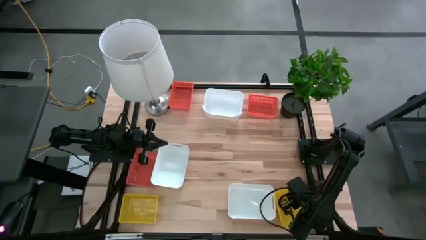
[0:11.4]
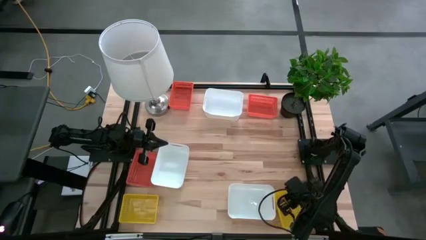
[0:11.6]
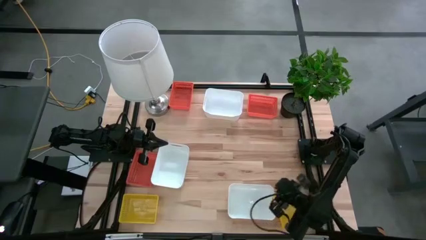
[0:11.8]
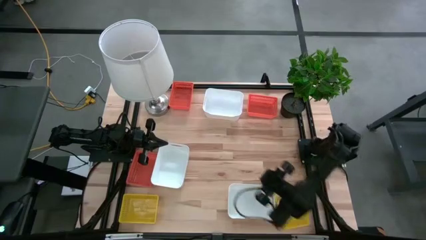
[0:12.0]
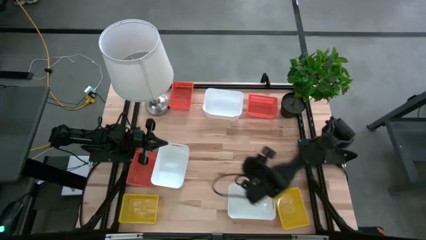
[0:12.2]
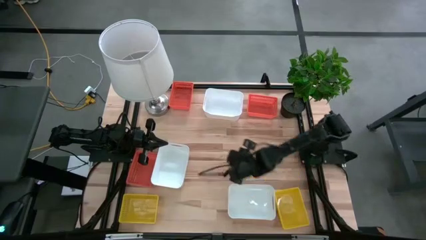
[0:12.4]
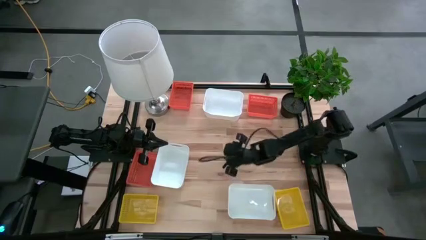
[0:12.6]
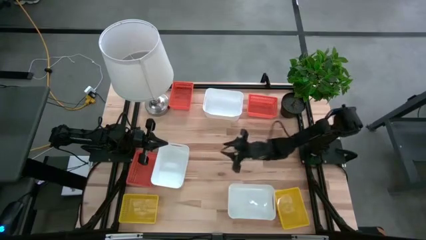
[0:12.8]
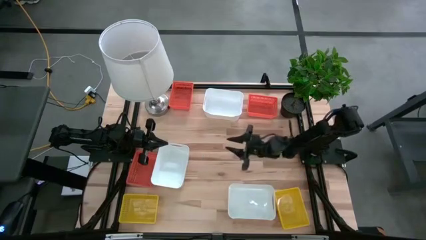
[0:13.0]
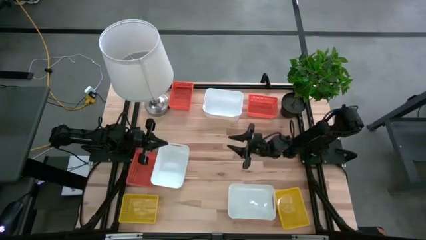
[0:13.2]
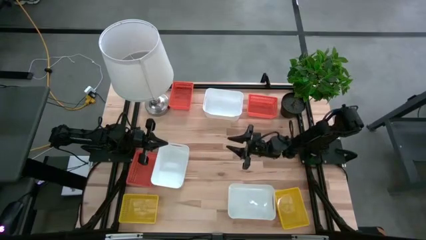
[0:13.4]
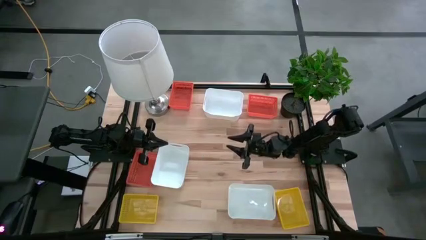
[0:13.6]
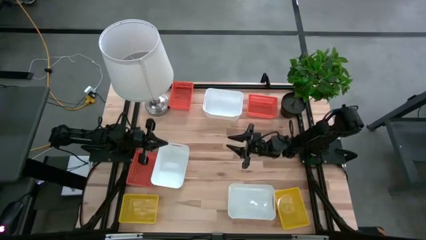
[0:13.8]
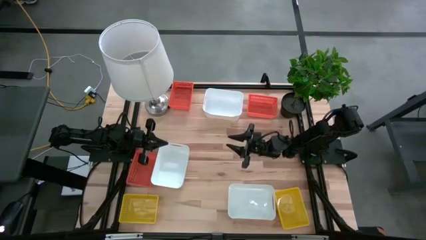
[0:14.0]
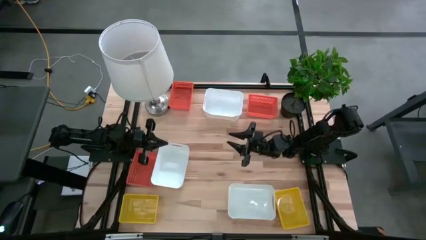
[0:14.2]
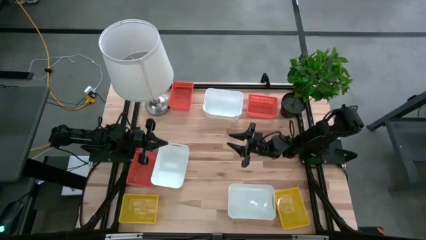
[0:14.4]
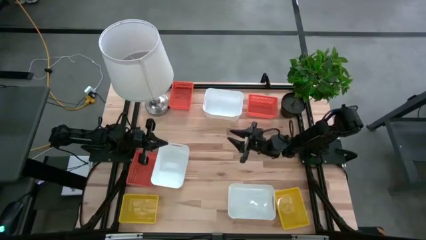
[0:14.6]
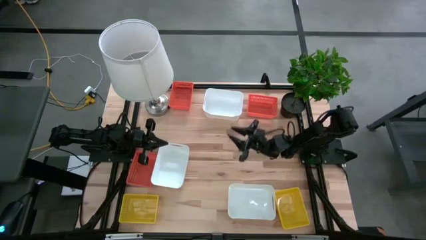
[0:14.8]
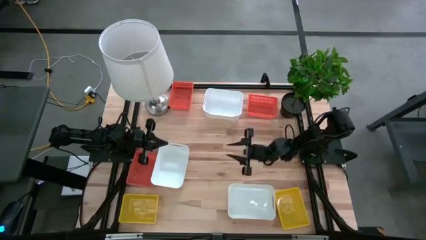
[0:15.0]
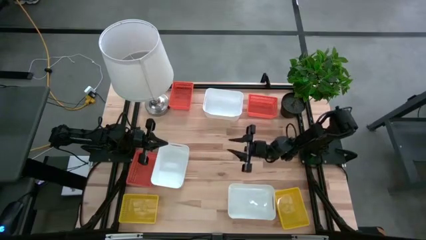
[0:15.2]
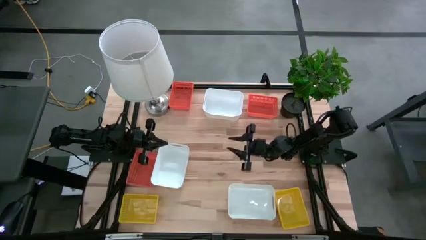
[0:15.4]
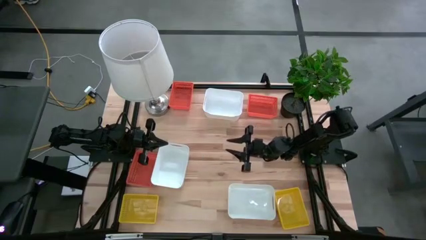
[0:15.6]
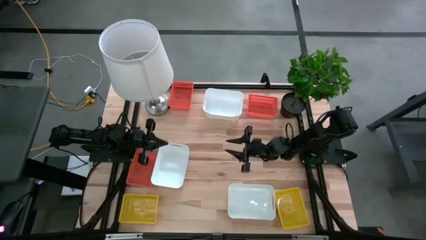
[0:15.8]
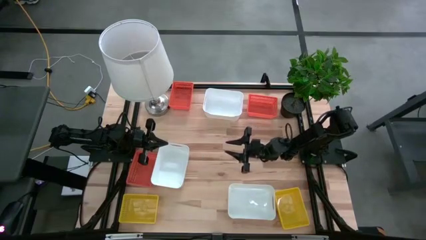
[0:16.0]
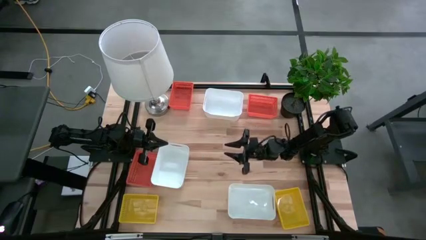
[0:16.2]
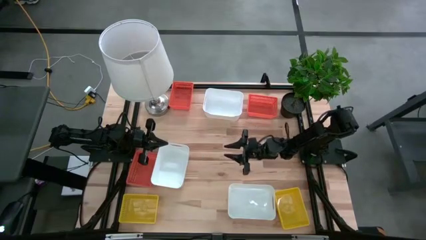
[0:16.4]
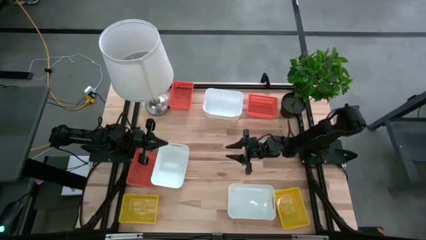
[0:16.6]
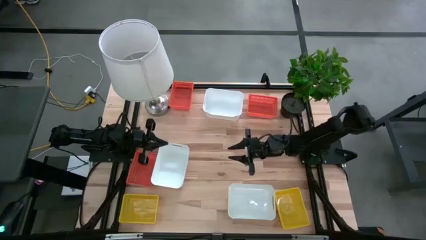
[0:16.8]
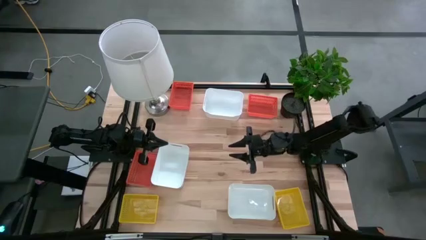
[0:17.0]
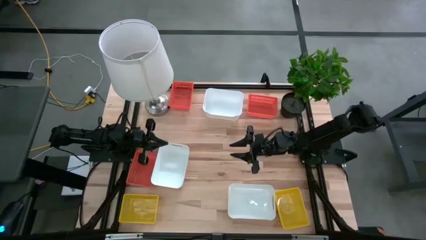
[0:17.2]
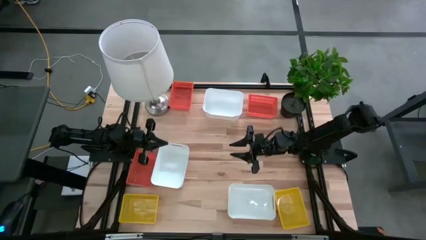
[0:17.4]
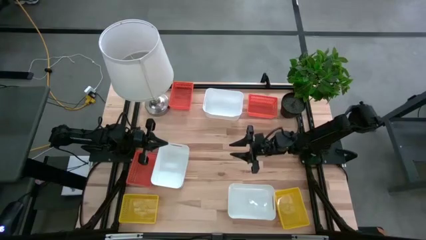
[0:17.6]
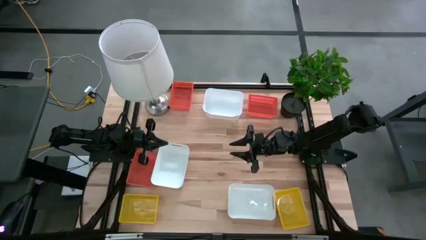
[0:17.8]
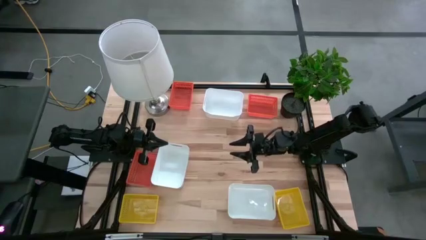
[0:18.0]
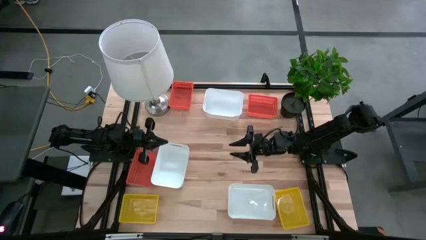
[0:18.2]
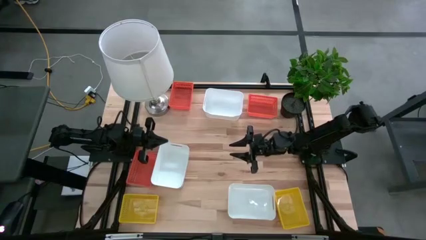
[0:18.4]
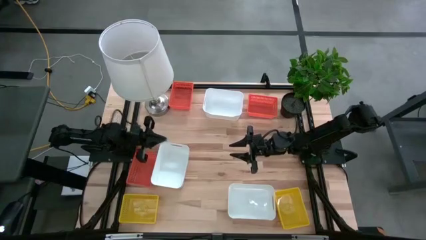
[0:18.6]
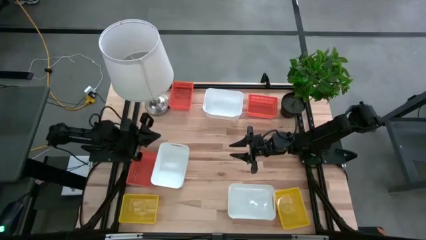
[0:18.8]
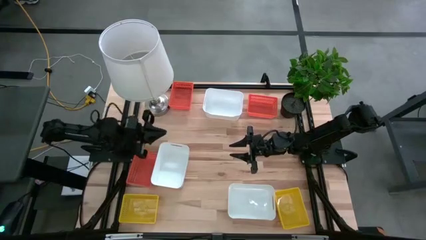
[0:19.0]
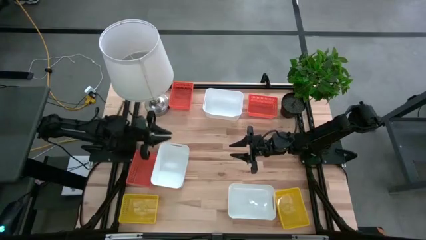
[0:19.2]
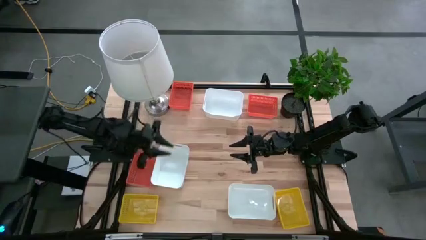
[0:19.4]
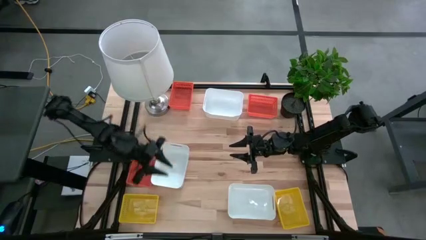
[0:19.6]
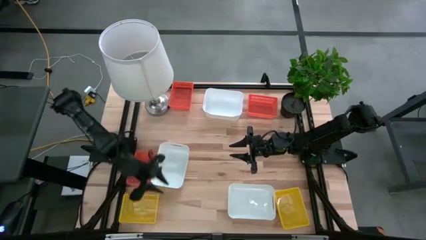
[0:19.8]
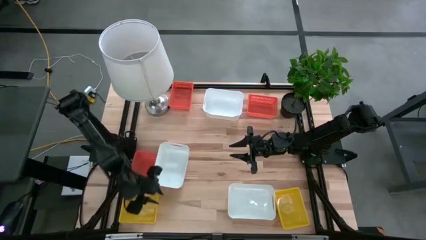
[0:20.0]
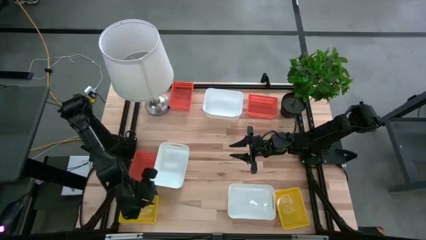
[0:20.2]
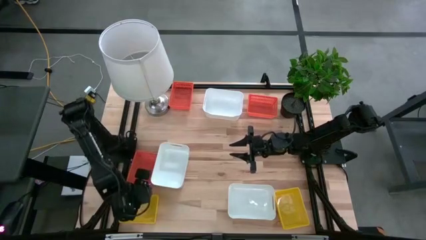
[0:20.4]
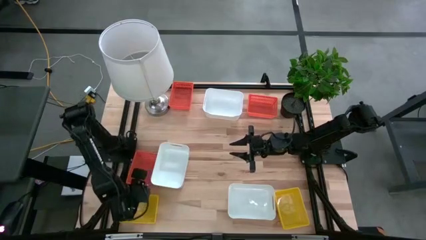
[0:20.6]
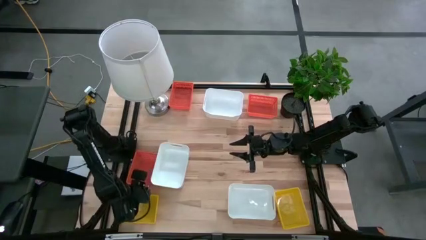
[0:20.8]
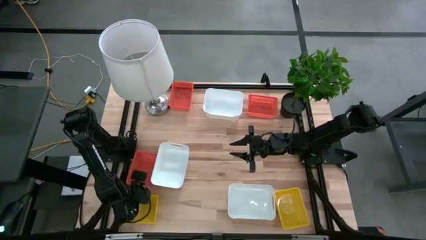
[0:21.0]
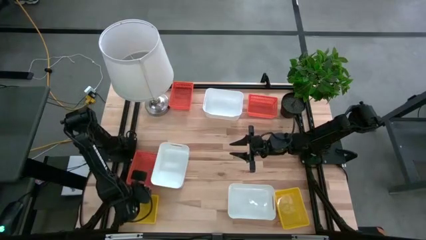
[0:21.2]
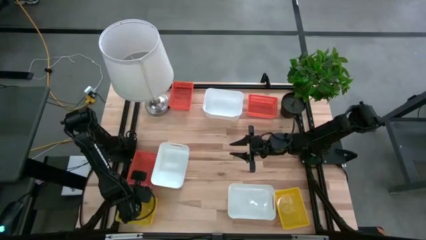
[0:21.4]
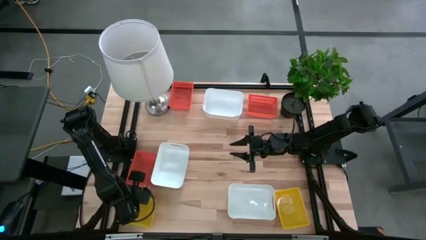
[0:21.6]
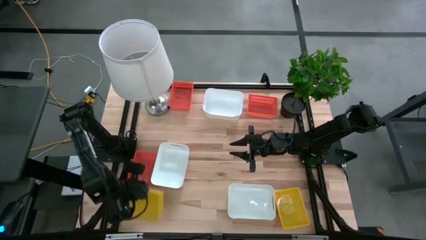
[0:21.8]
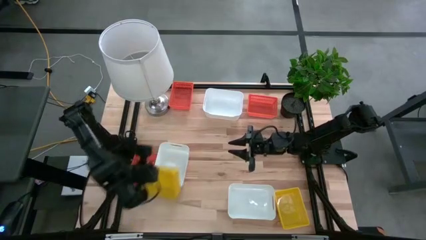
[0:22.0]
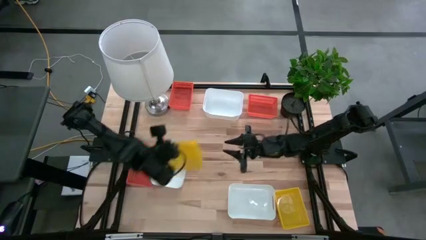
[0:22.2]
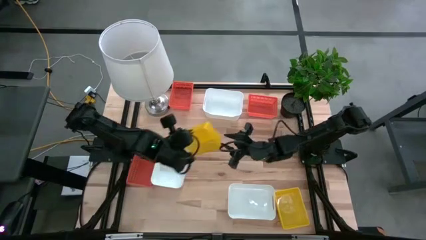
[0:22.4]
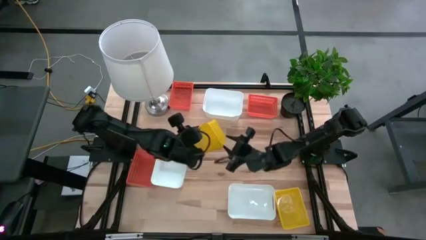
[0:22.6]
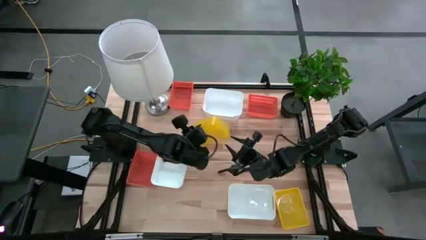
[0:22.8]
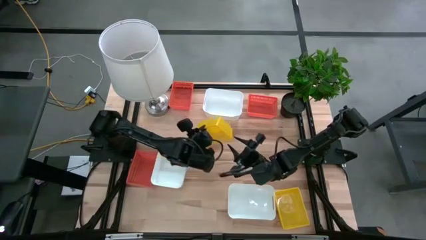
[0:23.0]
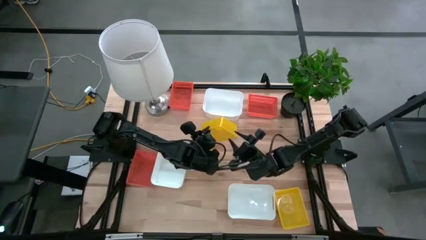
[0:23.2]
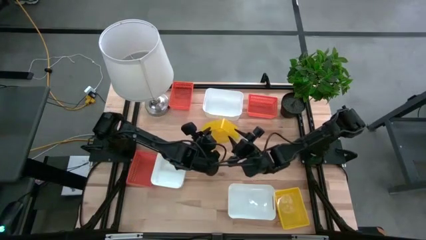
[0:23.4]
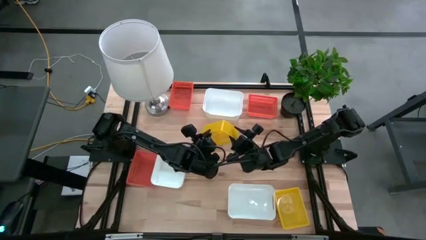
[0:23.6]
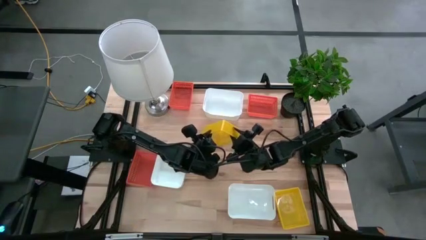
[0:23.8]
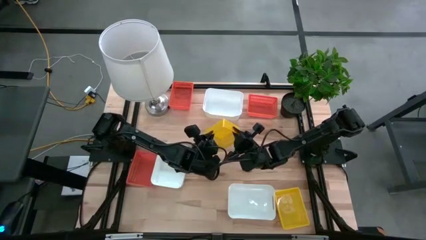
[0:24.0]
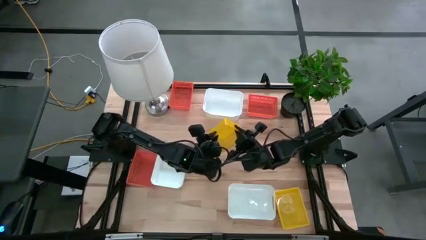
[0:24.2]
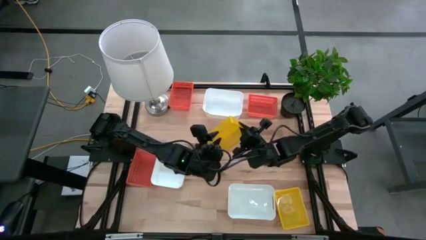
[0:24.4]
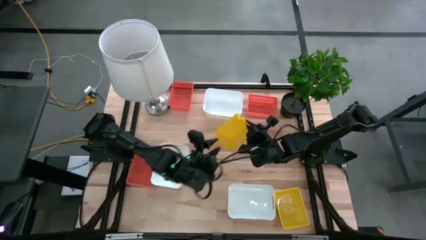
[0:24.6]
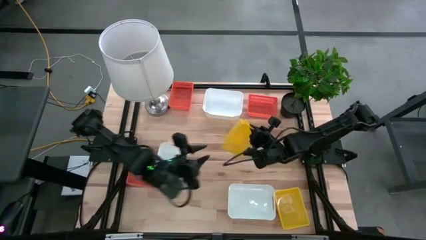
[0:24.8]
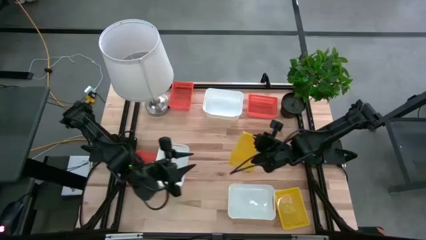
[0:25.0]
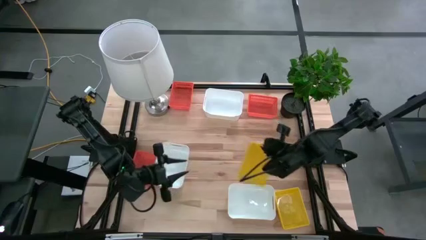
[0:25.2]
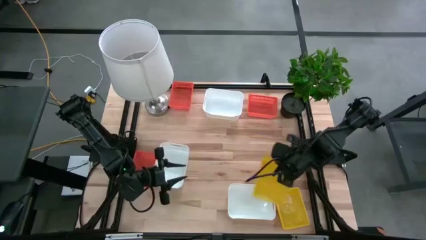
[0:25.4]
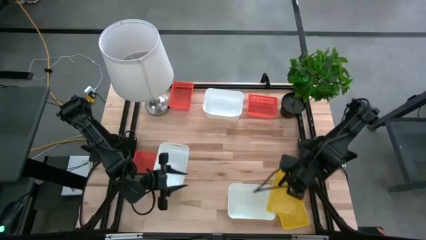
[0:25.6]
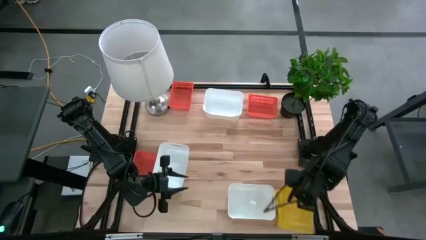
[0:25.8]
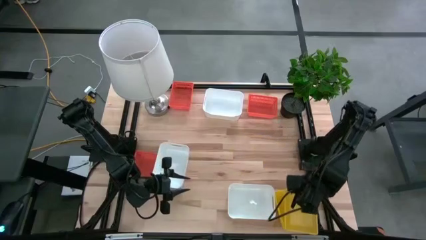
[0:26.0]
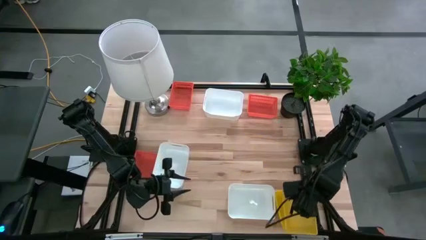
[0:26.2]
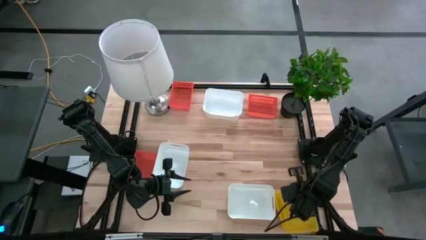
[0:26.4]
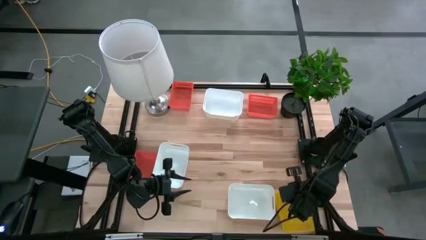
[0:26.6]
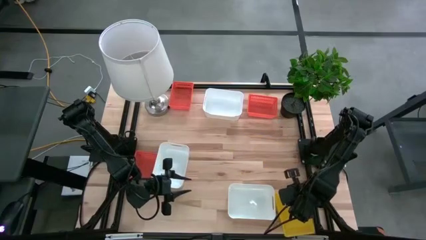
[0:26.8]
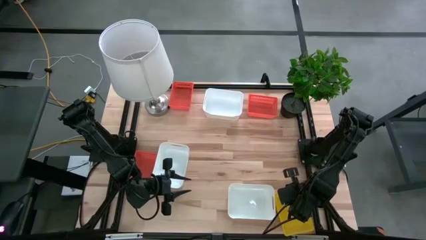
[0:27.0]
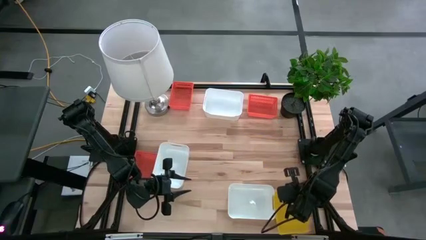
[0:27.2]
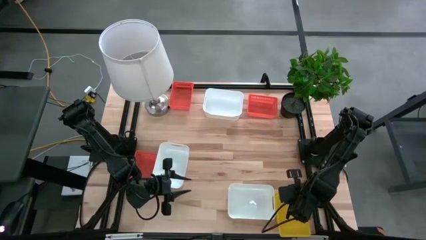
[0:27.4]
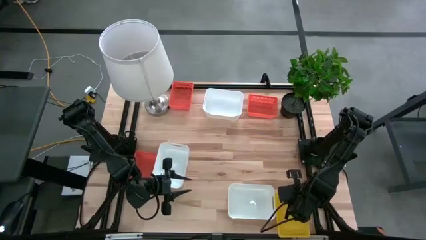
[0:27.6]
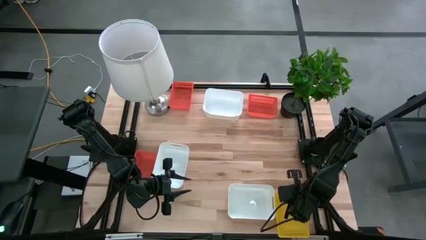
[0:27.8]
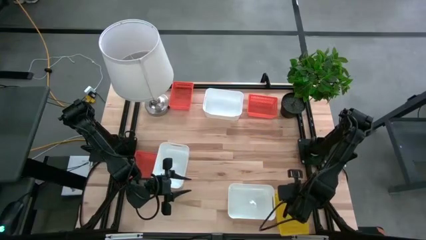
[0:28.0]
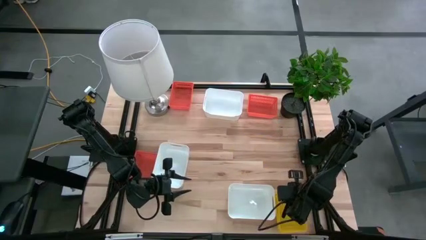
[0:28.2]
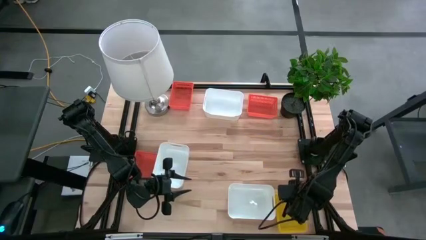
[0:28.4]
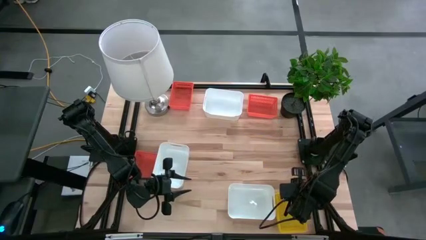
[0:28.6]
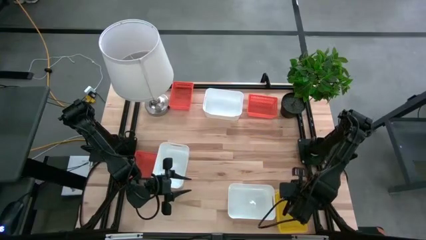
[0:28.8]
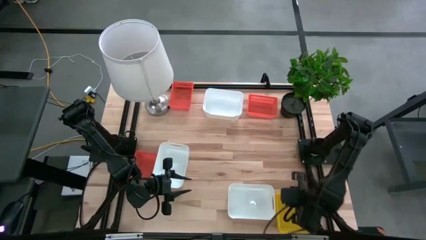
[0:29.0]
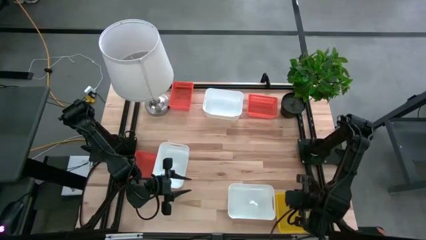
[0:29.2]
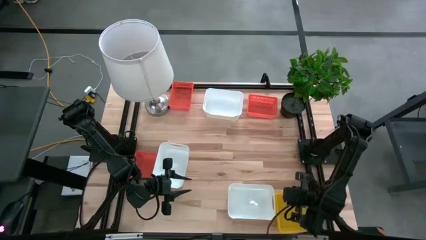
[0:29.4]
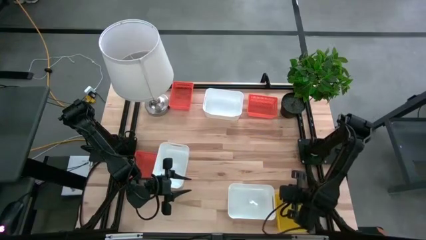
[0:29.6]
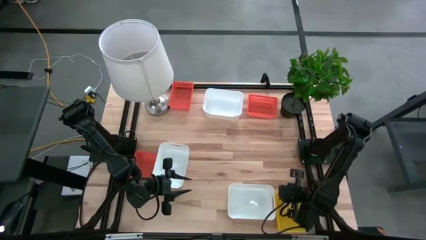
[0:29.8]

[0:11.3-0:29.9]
Stack the left yellow bin on the right stacked yellow bins
